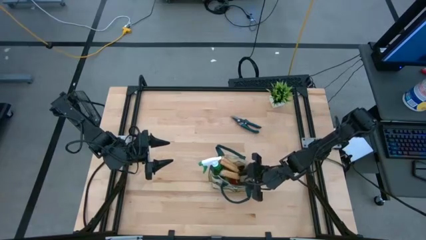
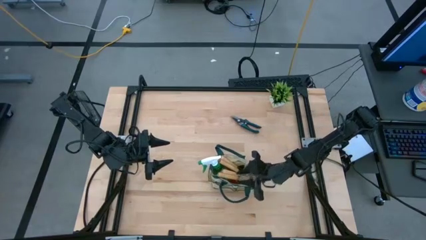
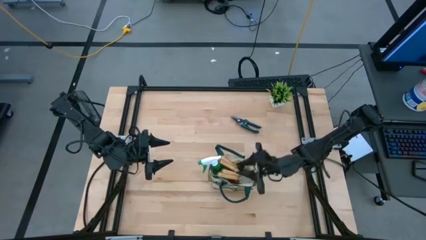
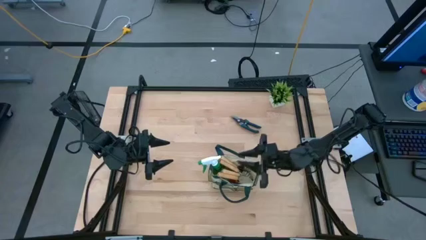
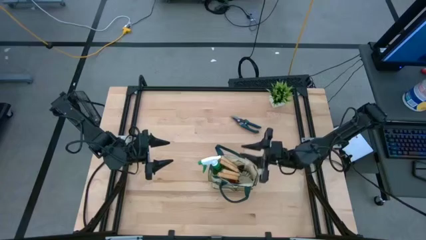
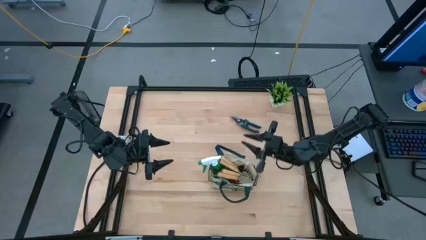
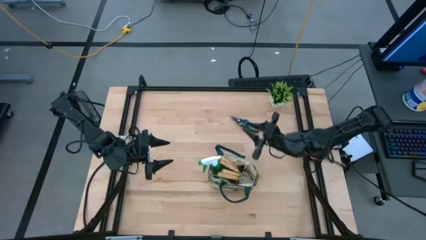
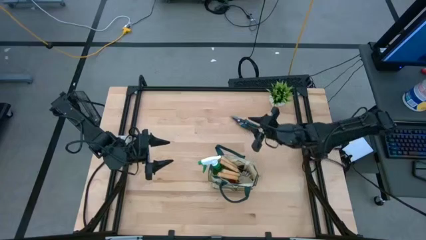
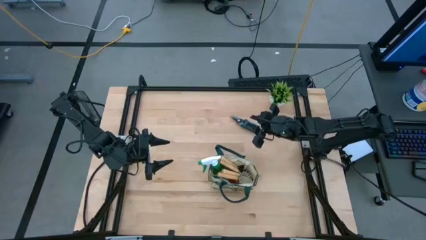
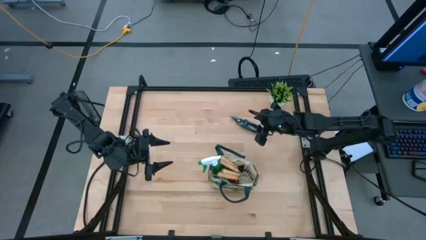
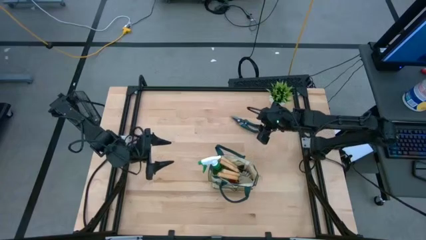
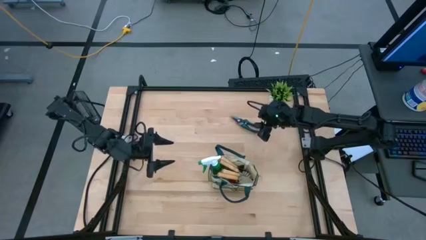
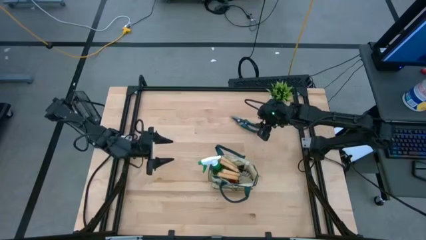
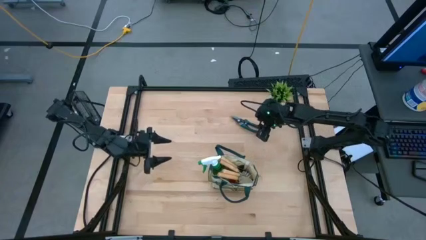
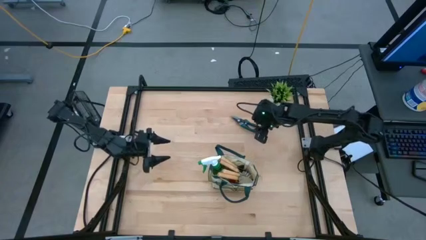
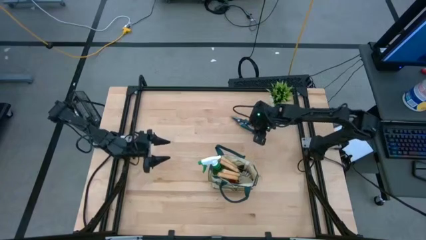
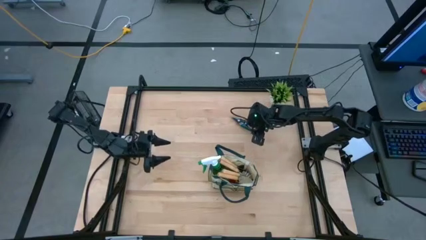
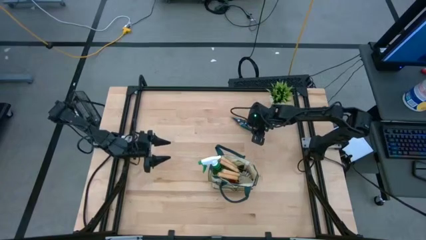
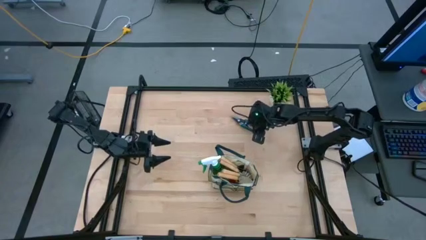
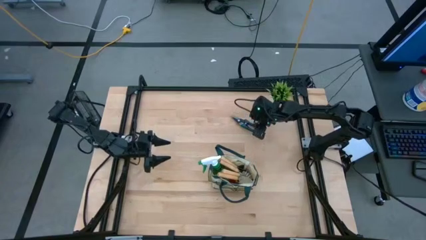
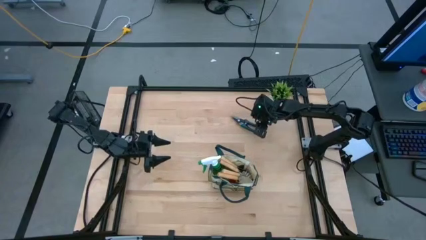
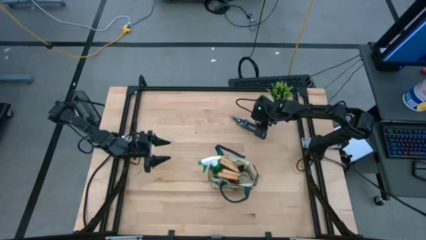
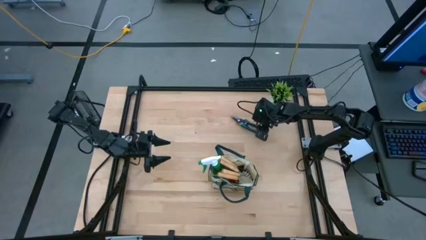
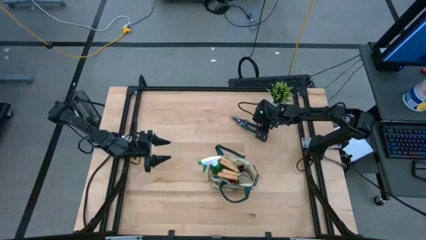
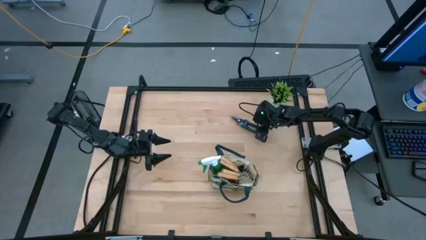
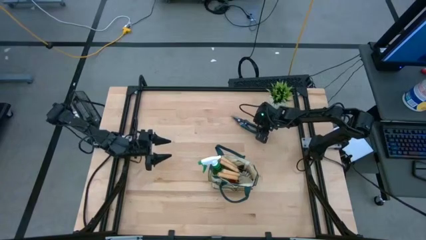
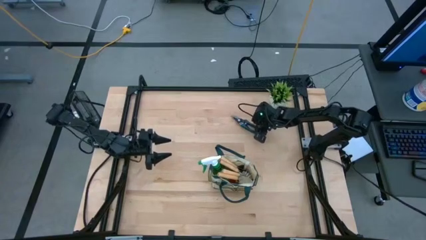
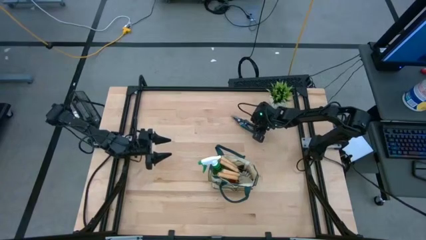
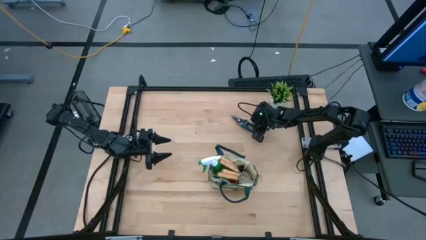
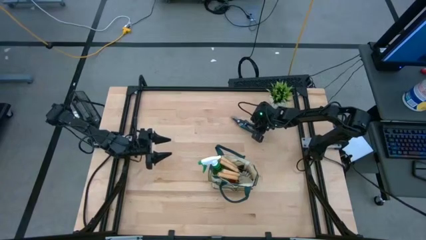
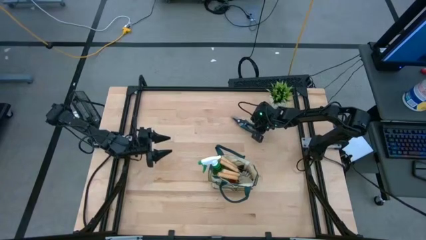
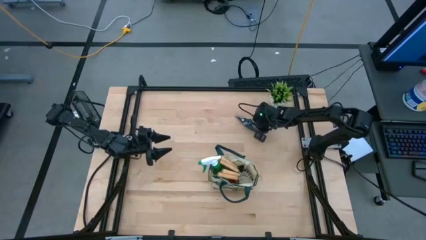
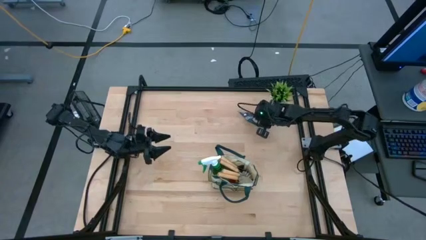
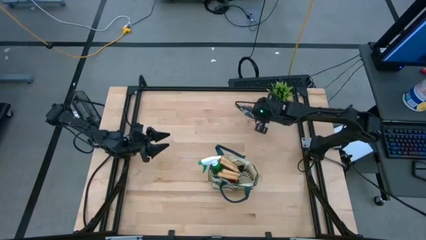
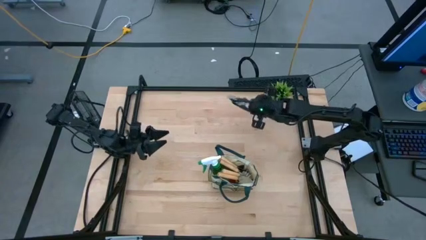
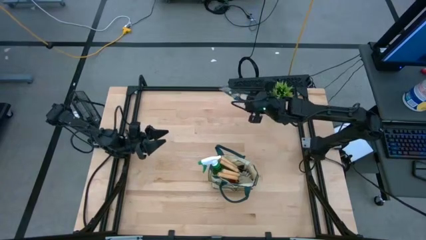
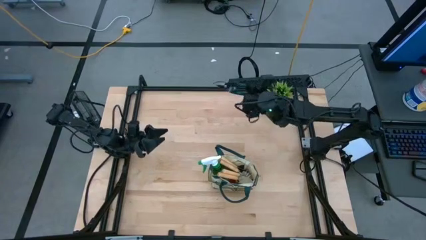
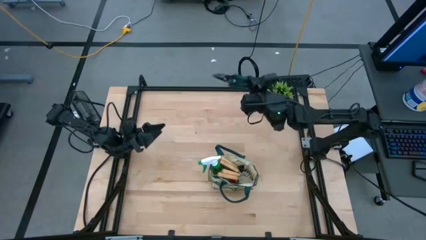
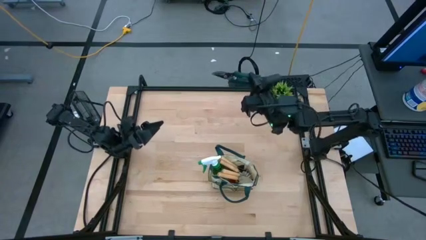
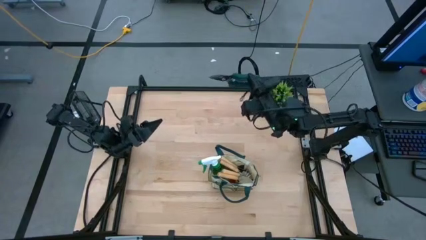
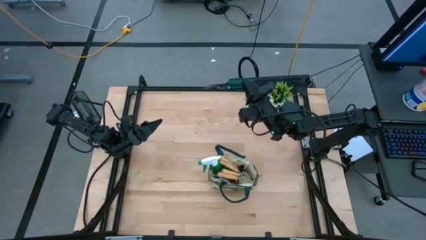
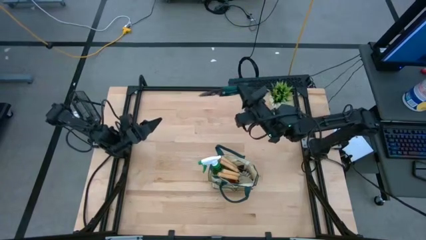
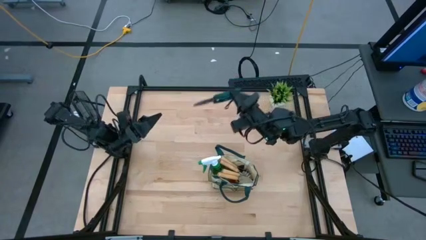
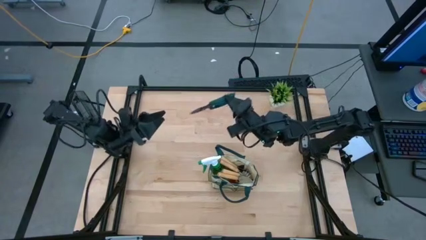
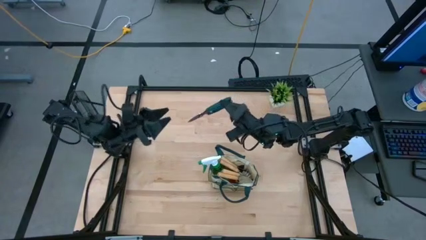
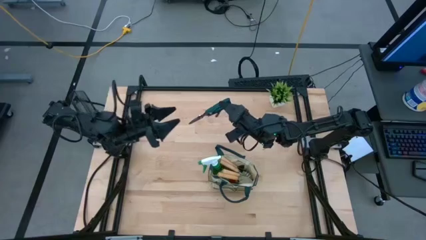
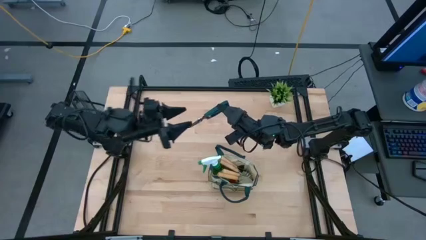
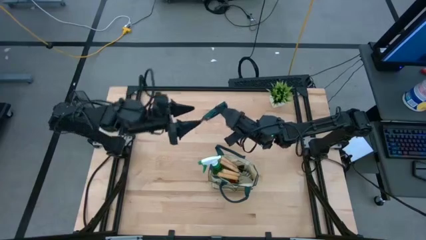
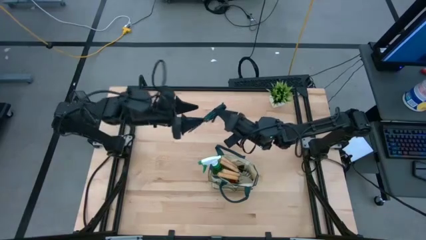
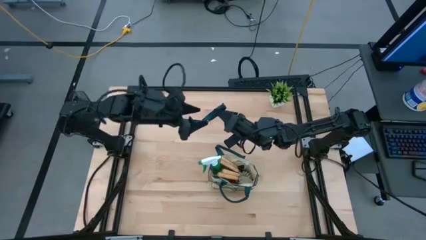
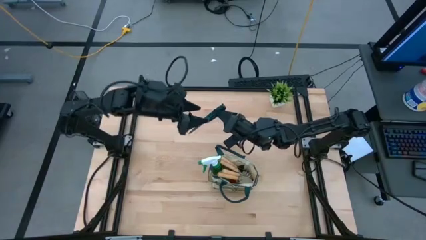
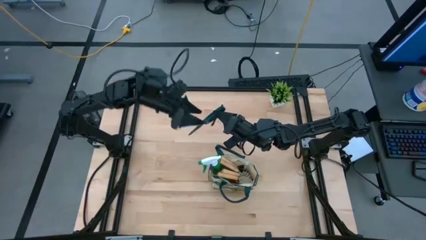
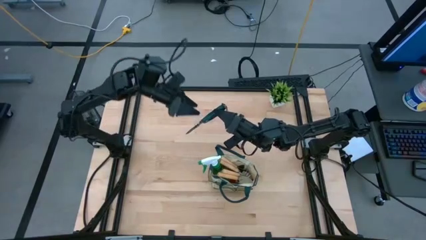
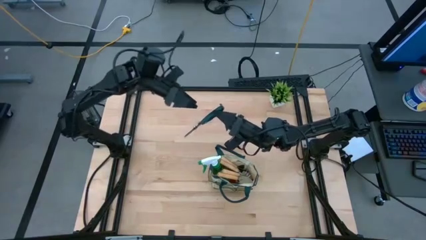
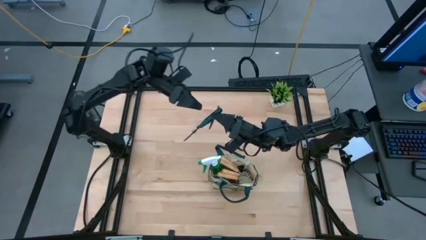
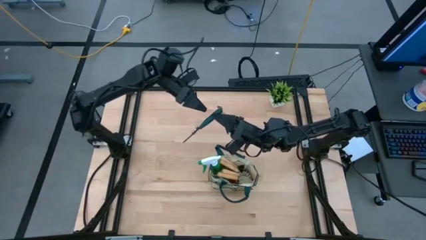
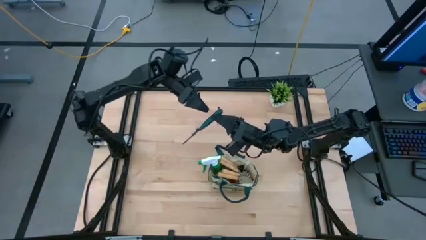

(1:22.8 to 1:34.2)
Task: Pick & Place Garden tools in Gardening bag
Put the green shear scissors into the gardening bag

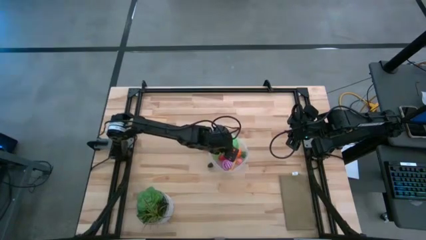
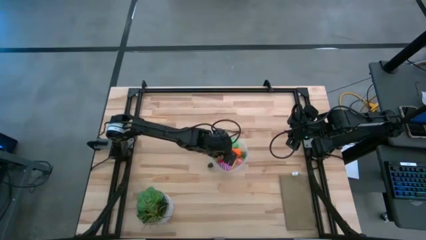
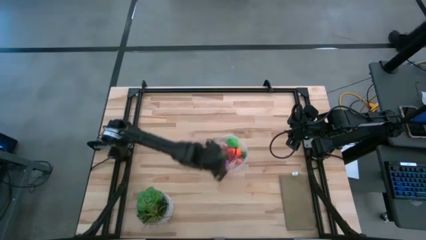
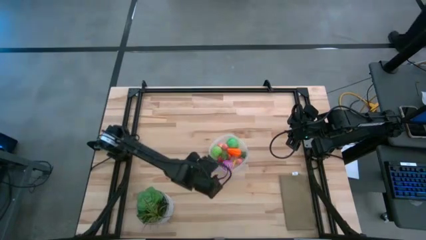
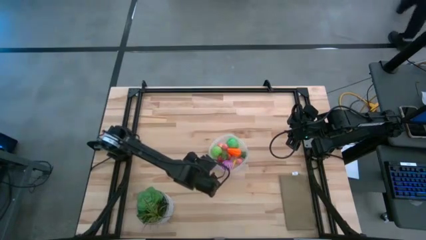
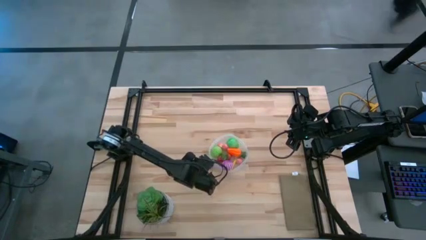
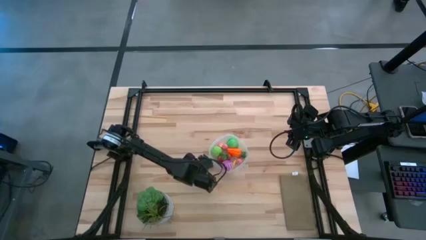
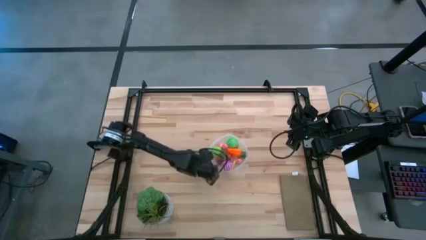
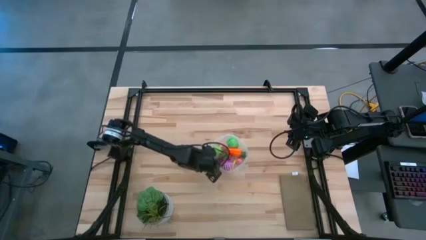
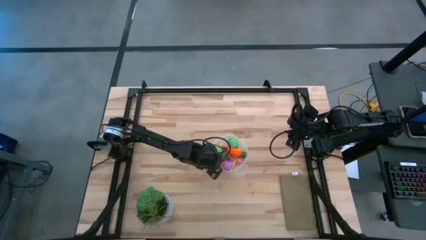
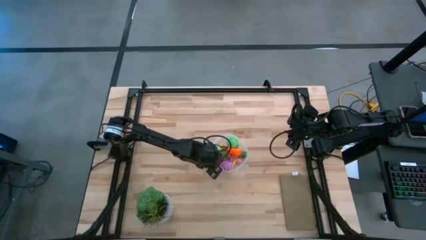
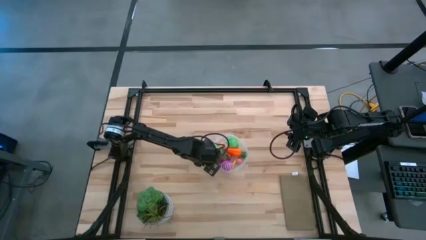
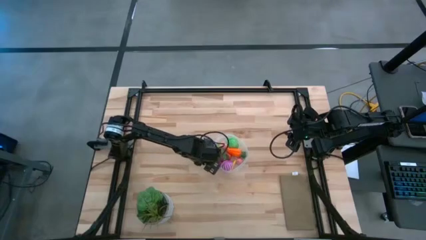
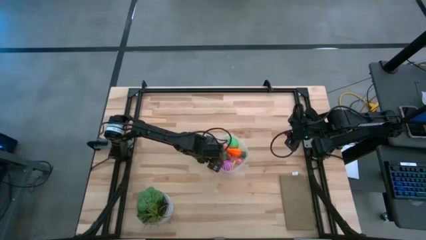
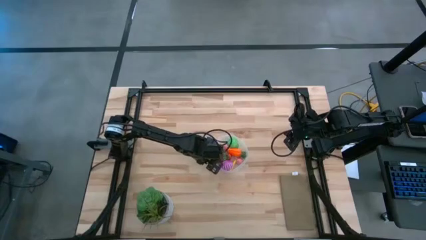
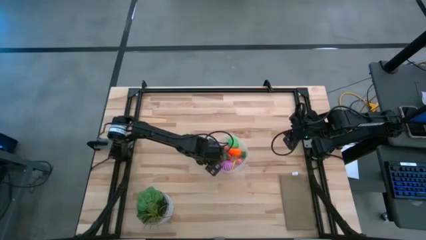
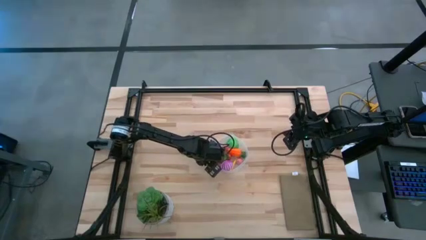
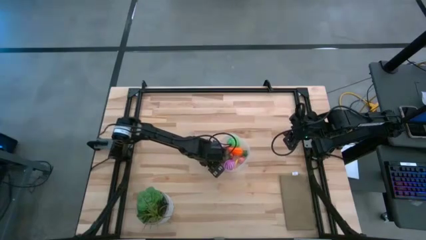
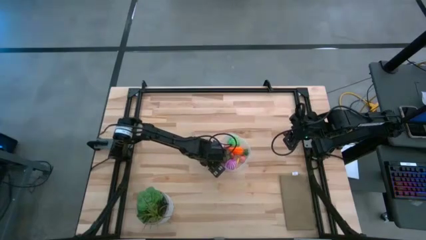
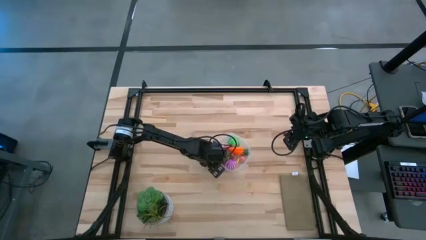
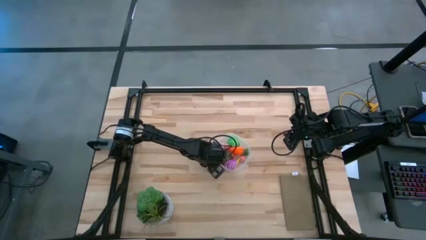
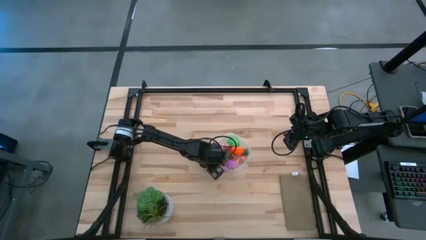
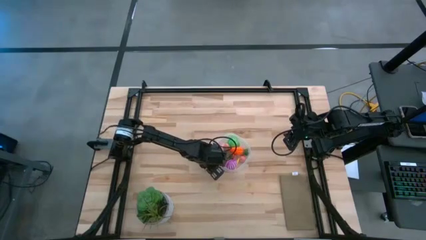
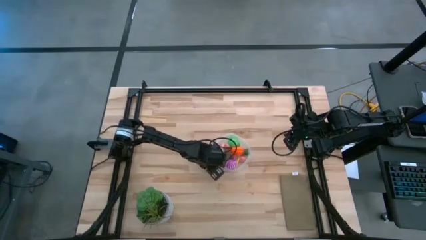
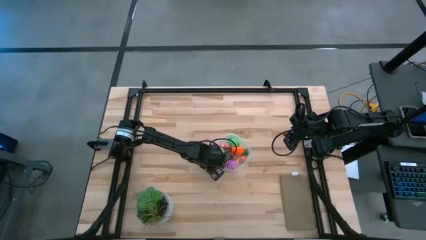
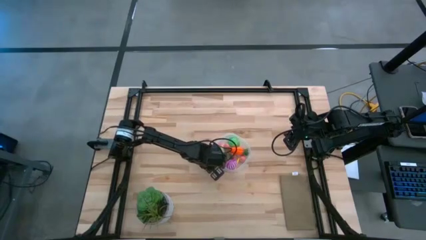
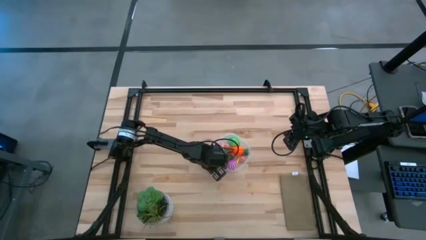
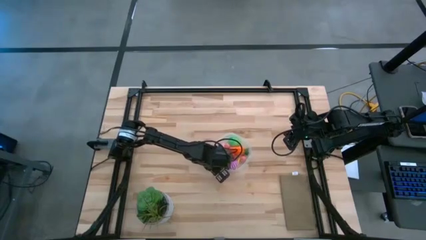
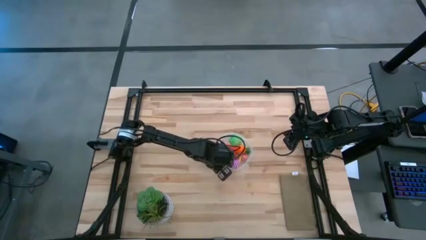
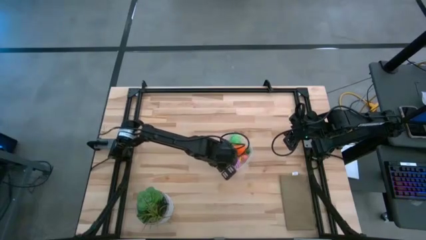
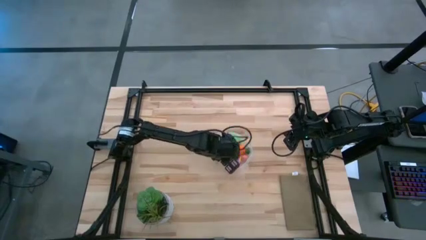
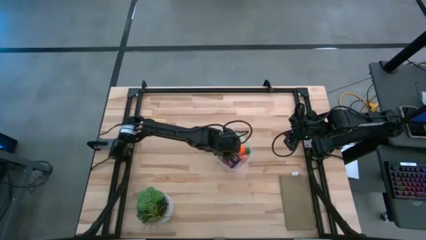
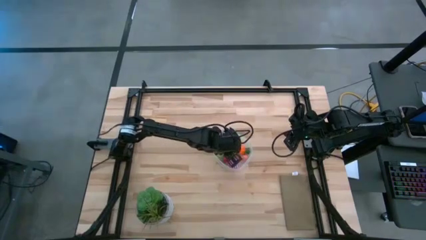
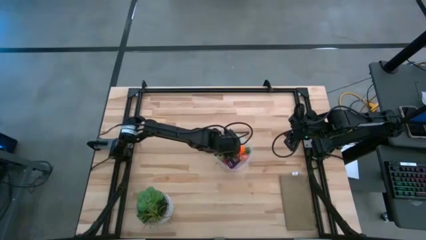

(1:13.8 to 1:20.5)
Task: Pick and placing Produce into tupperware
Put the blackberry into the transparent bin
